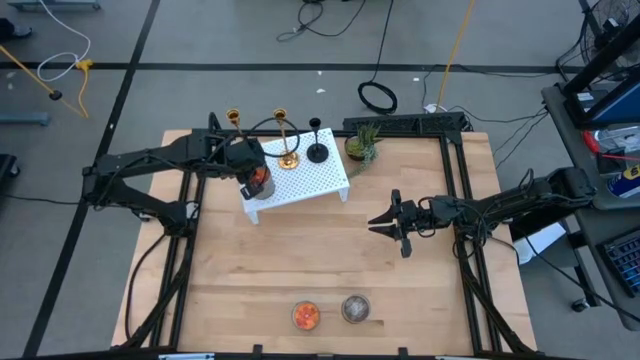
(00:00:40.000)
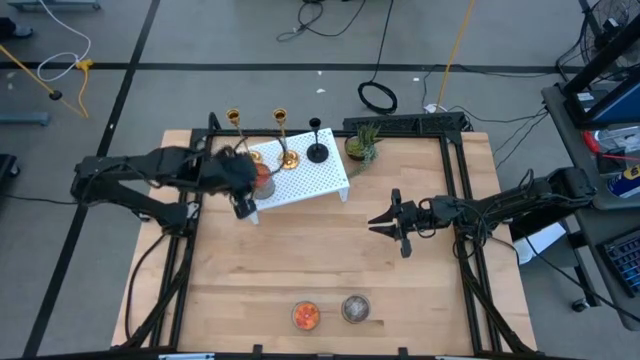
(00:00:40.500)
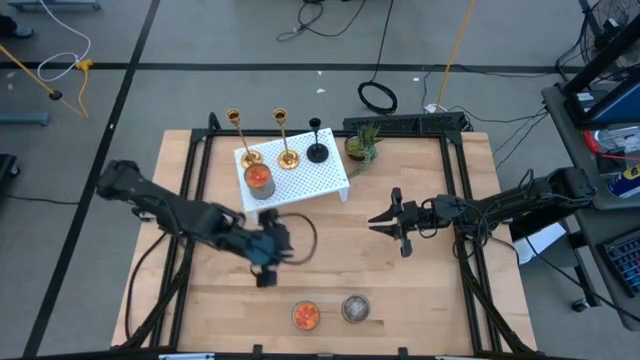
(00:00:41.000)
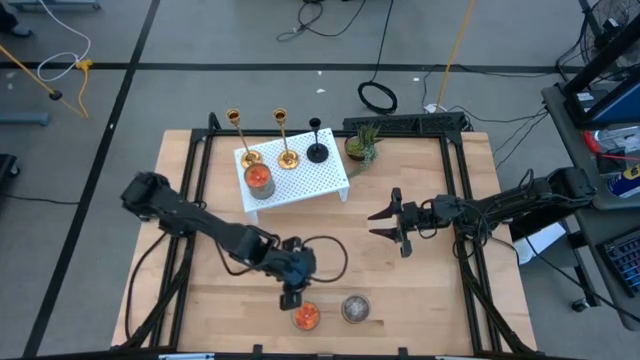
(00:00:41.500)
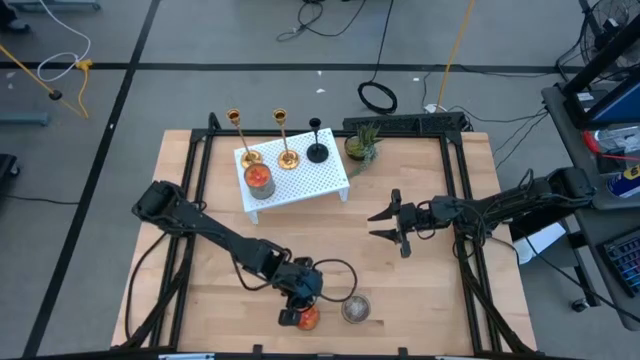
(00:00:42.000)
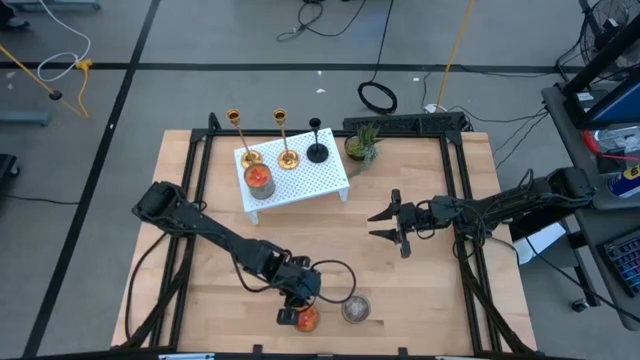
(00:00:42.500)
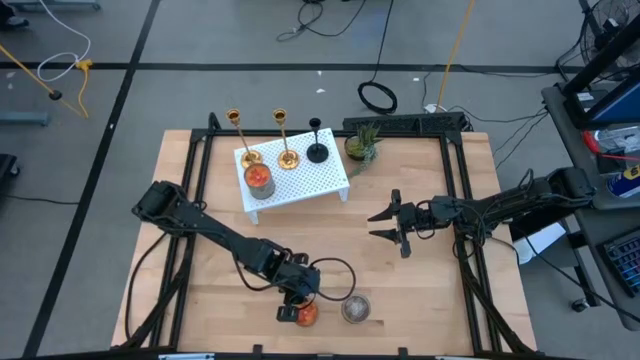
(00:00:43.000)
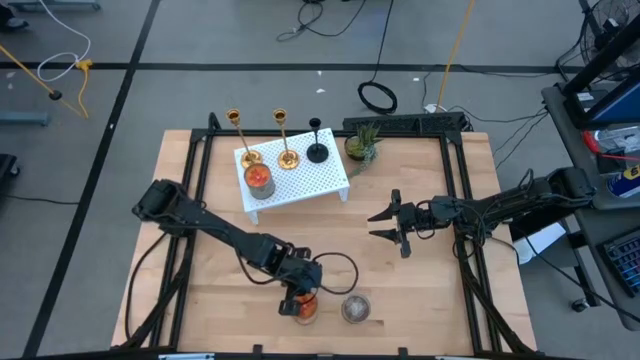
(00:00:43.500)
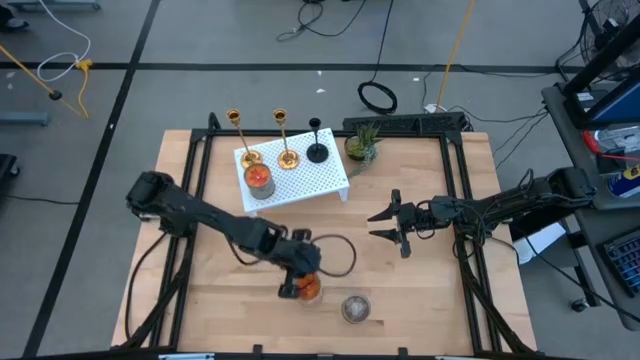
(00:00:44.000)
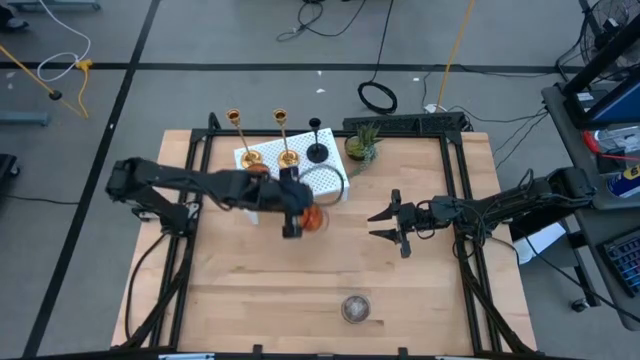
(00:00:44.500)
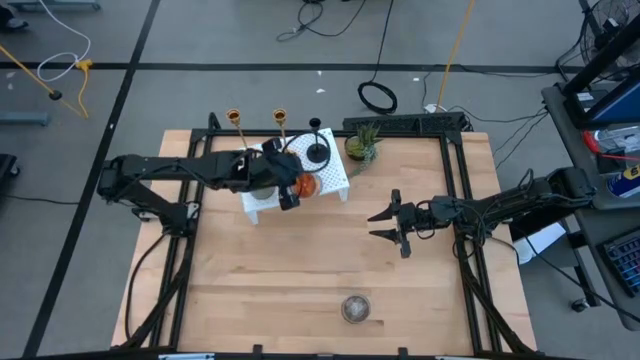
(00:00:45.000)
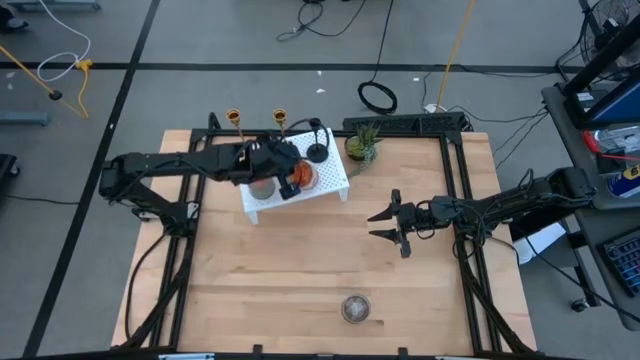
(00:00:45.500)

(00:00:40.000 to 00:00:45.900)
Task: Pick & Place candle stick holders
Put the orange scented candle on the shelf

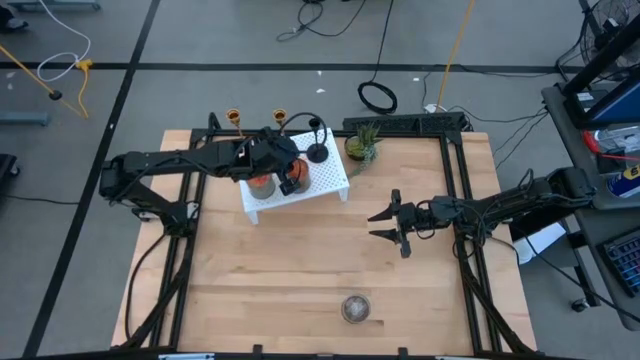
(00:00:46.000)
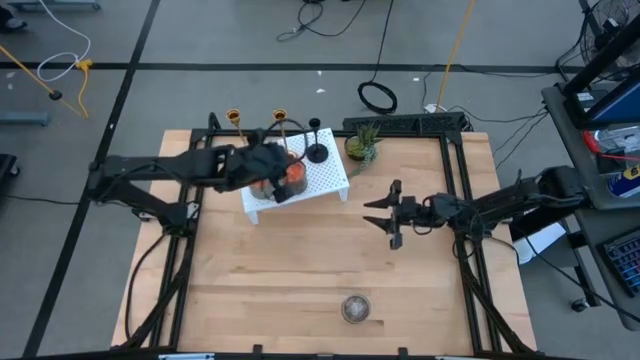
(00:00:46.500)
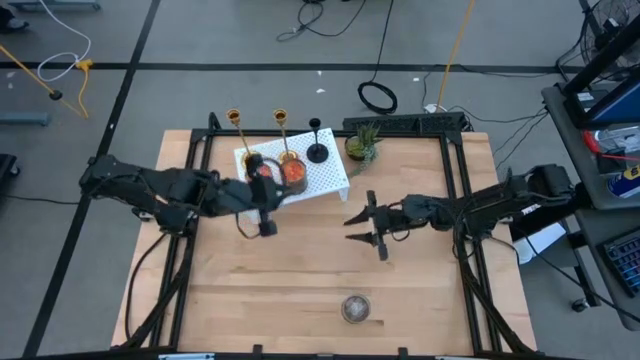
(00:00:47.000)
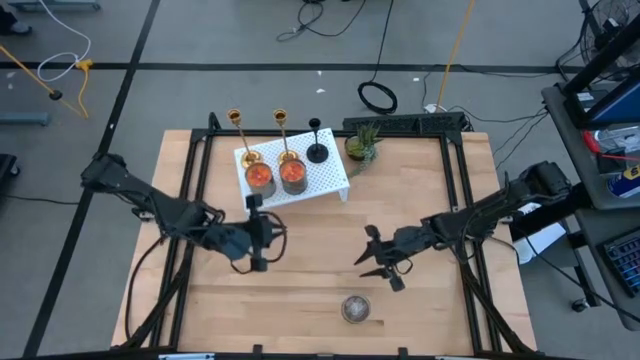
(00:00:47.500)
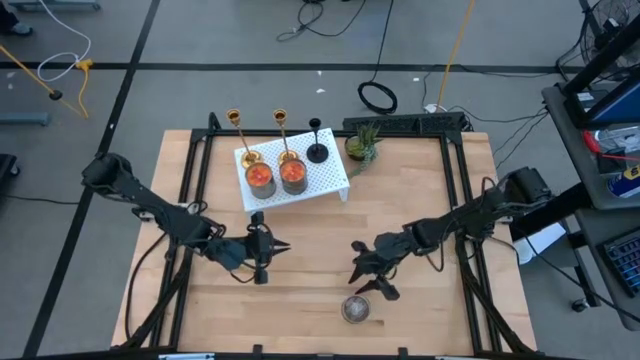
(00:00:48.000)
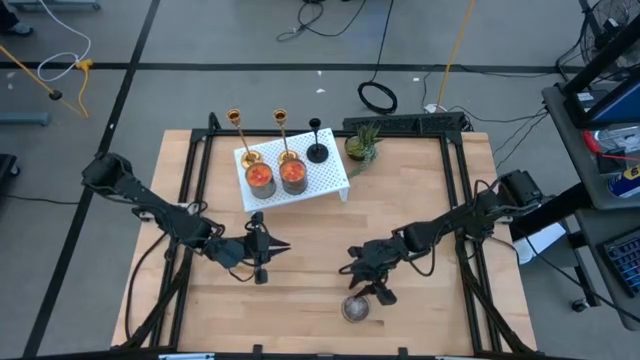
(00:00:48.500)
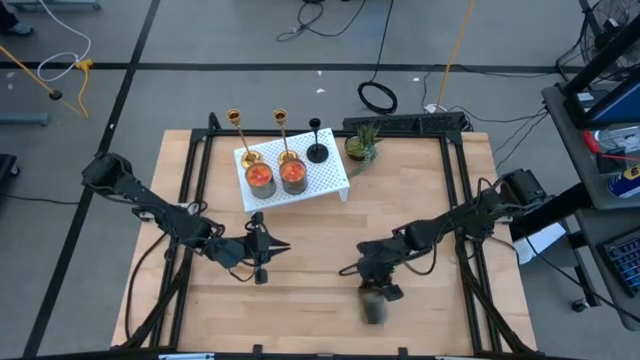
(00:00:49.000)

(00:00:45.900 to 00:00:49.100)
Put the brown scented candle on the shelf

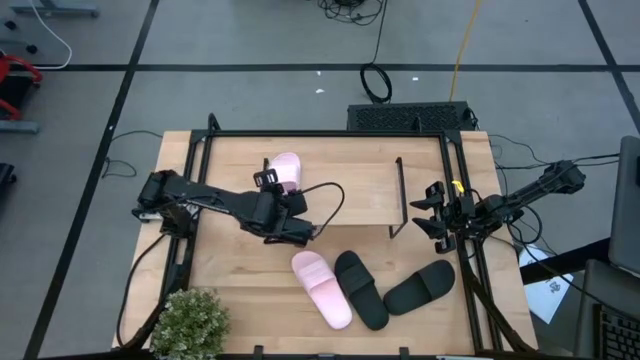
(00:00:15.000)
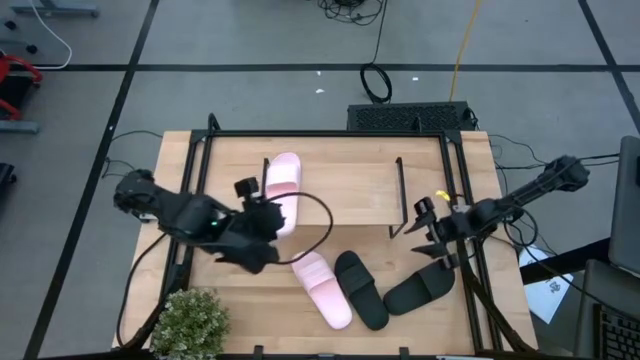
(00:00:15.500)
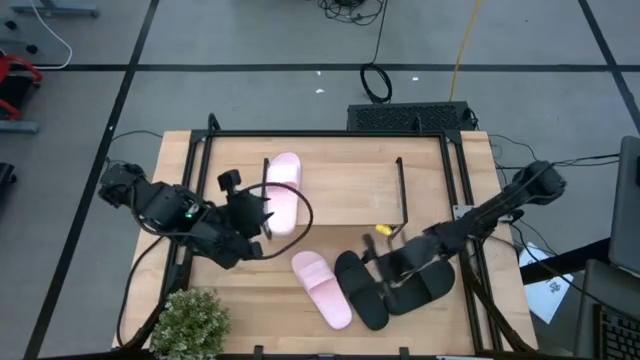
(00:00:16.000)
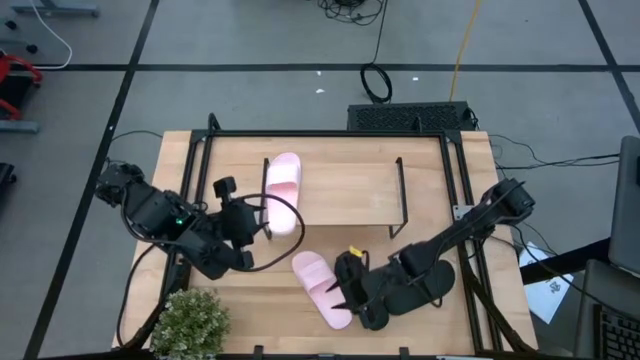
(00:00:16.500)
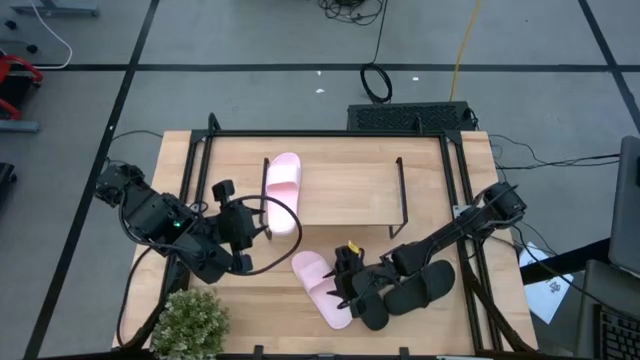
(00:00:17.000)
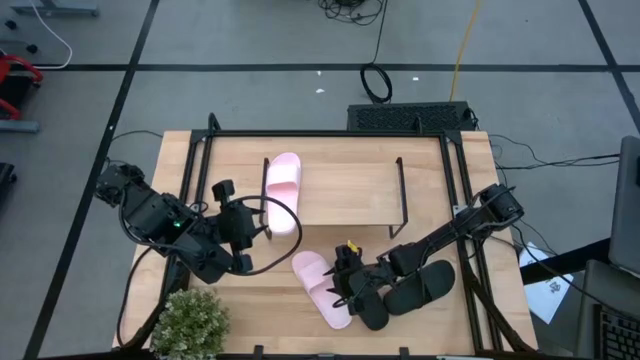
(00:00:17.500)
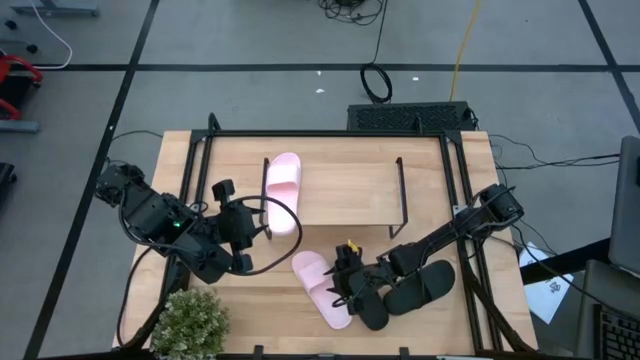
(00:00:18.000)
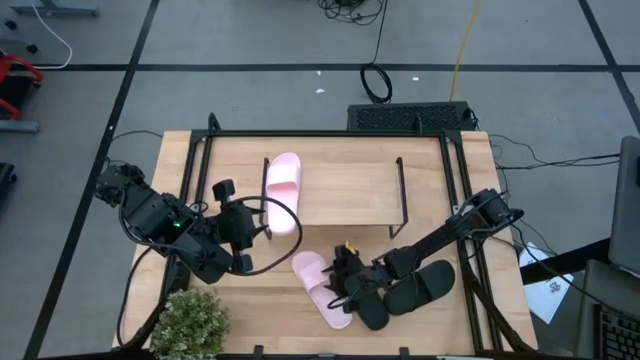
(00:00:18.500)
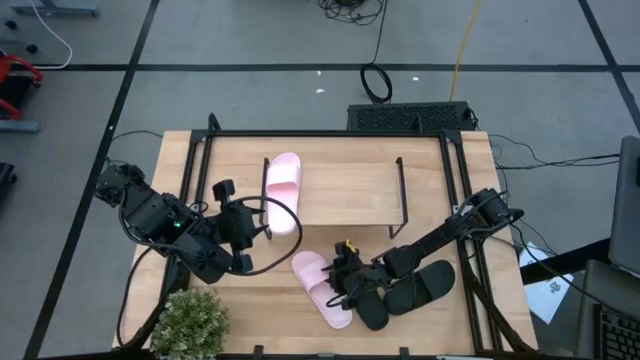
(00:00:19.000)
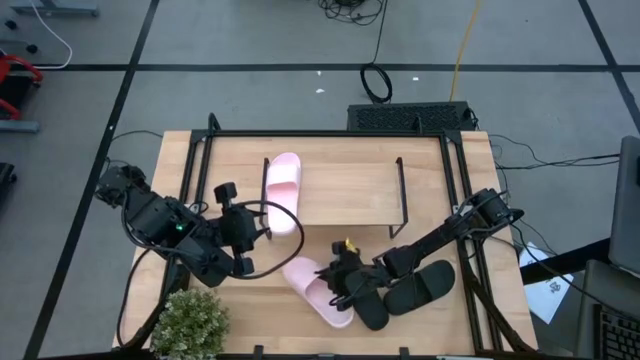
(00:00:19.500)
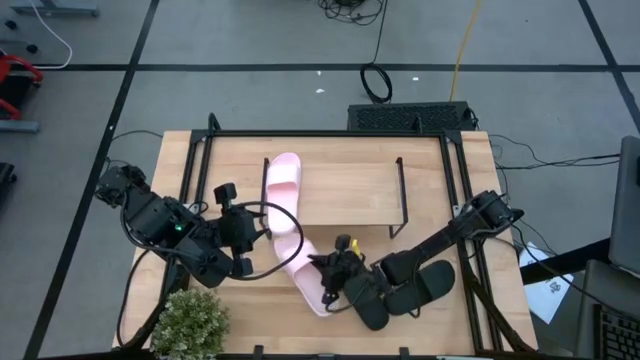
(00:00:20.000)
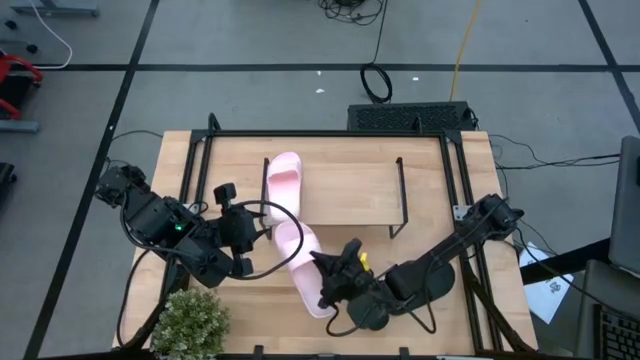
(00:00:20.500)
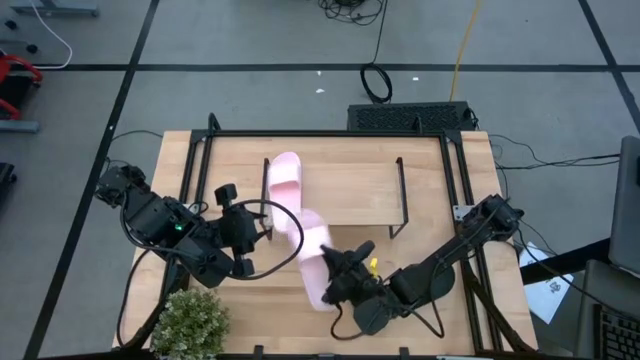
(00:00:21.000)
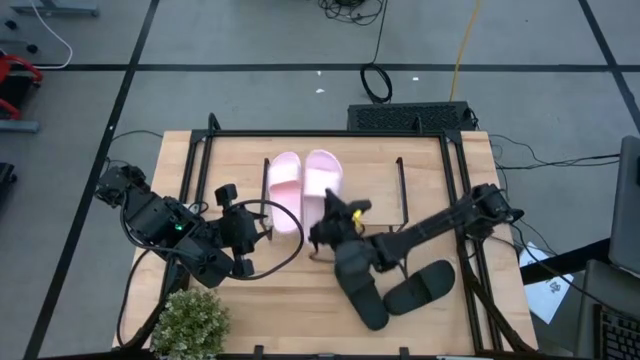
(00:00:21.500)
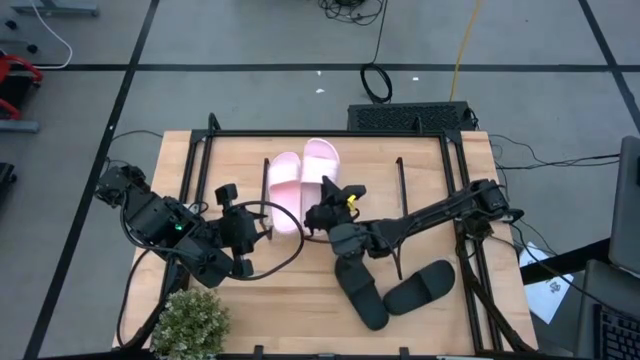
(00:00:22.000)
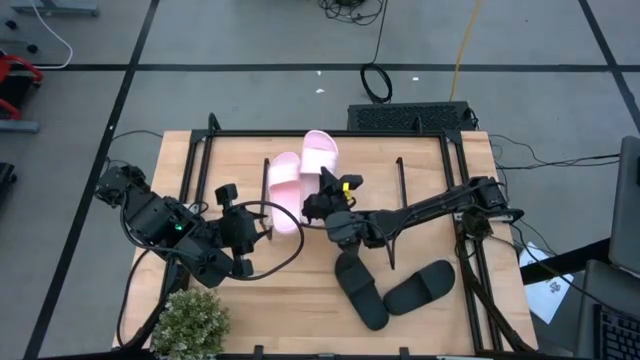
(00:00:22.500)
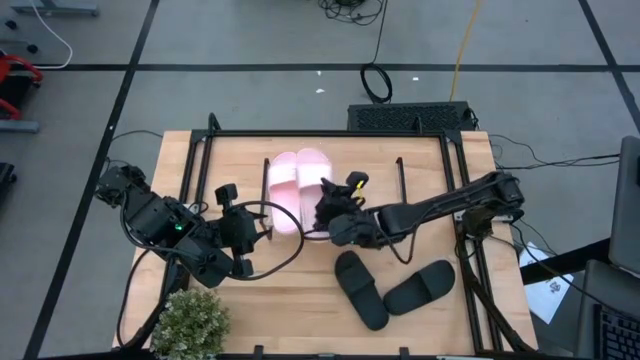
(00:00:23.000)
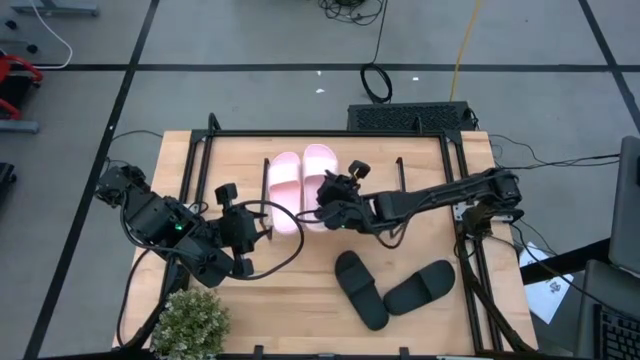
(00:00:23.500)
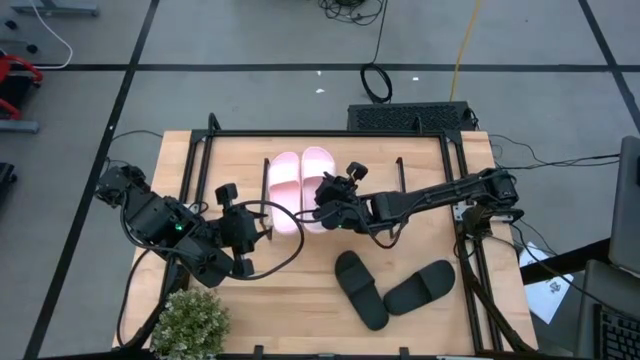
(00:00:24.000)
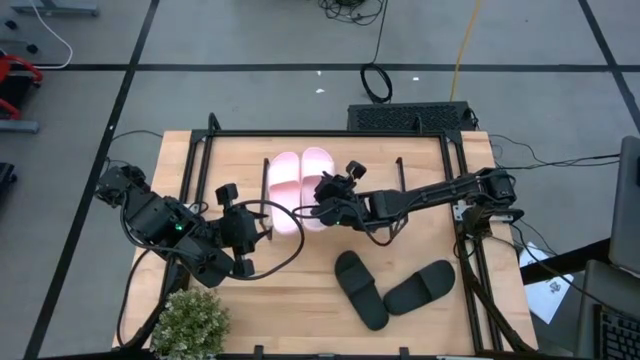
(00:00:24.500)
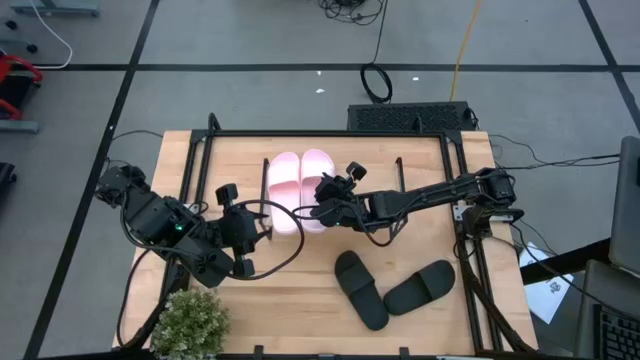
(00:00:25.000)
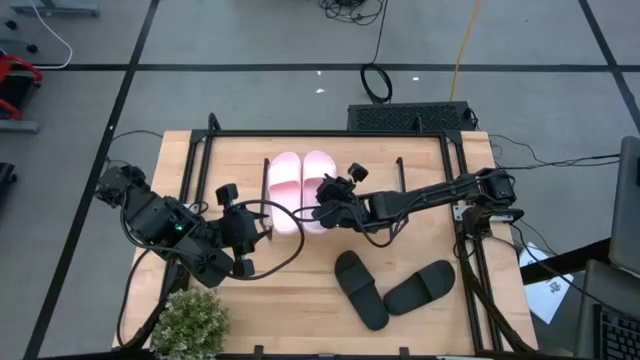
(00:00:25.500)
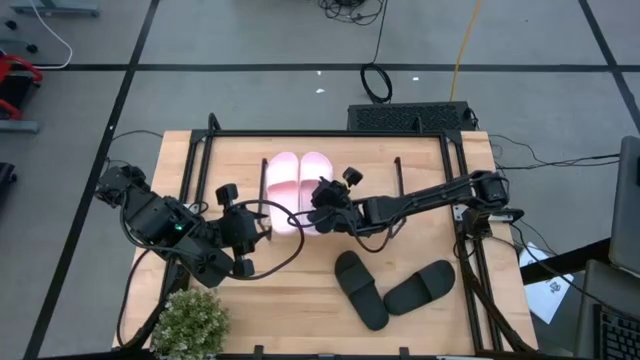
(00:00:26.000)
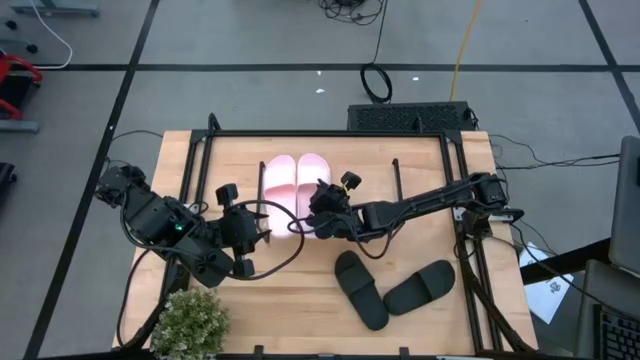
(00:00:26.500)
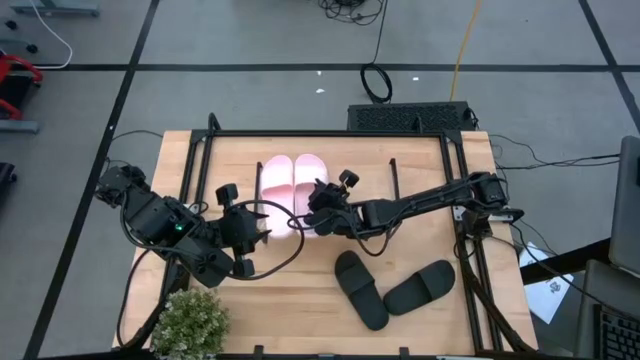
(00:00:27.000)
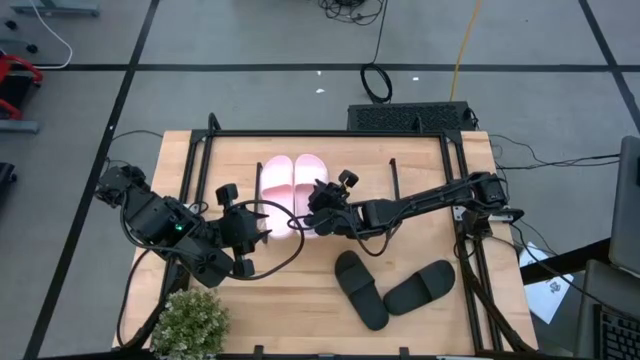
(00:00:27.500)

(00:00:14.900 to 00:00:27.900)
Task: Pick and place slides into the shelf
Put the pink slipper on the shelf
